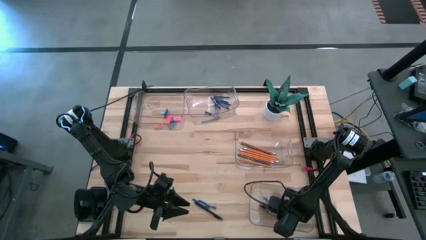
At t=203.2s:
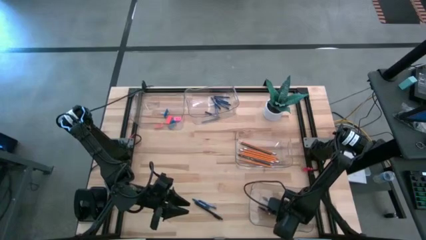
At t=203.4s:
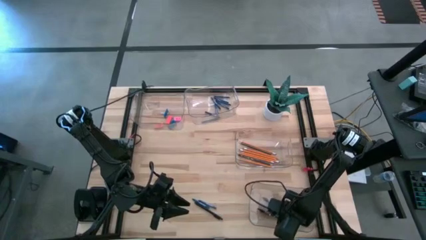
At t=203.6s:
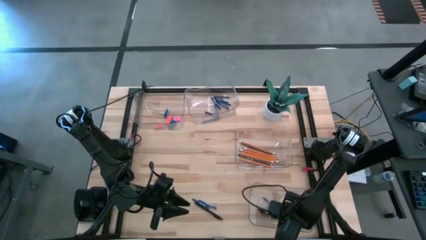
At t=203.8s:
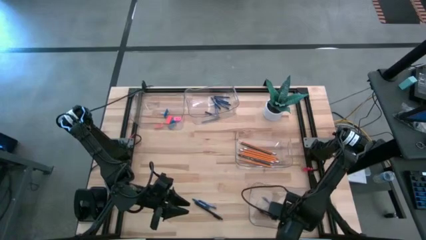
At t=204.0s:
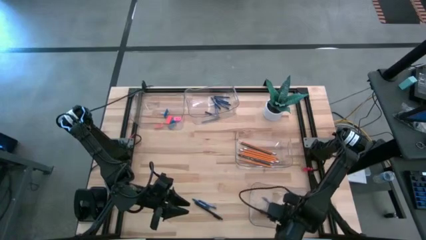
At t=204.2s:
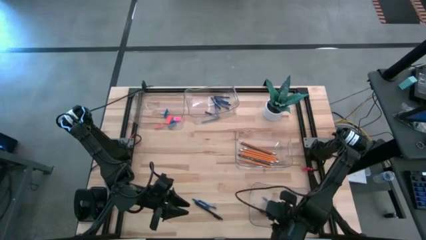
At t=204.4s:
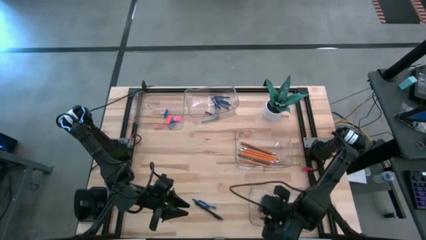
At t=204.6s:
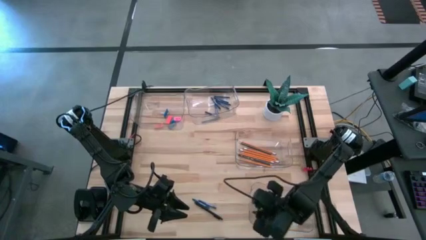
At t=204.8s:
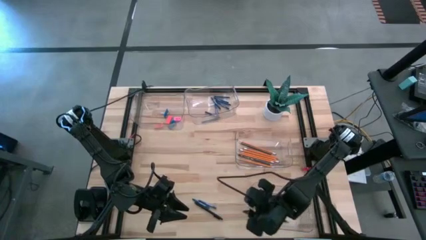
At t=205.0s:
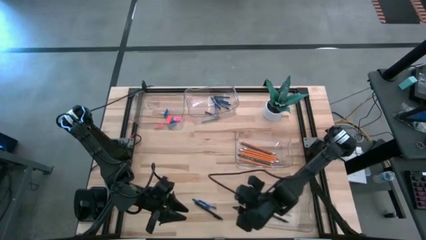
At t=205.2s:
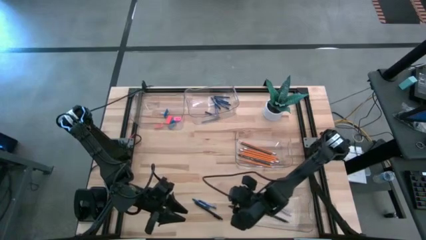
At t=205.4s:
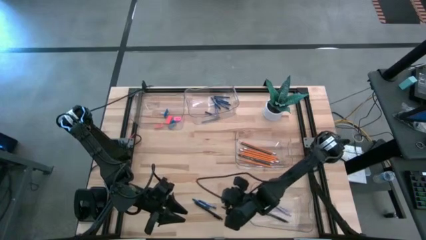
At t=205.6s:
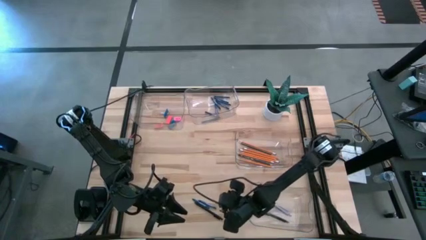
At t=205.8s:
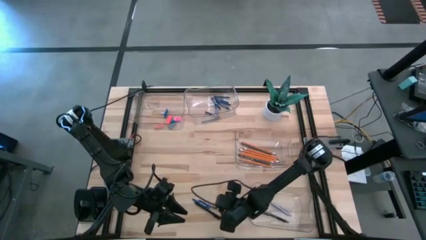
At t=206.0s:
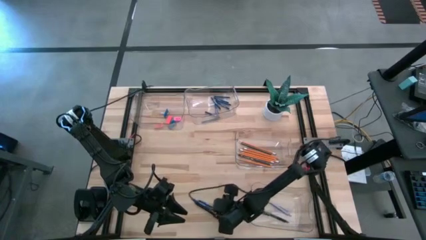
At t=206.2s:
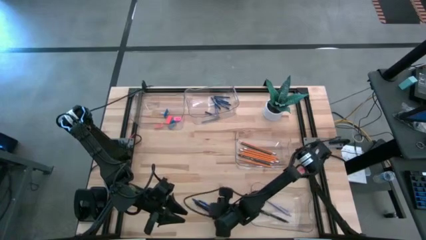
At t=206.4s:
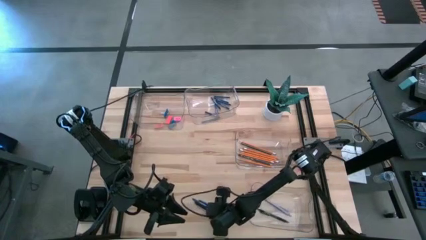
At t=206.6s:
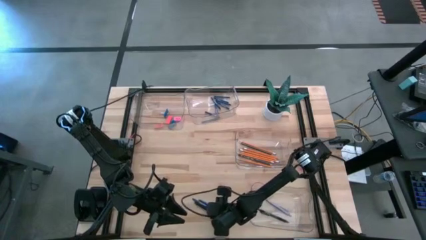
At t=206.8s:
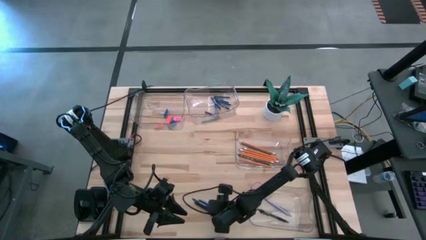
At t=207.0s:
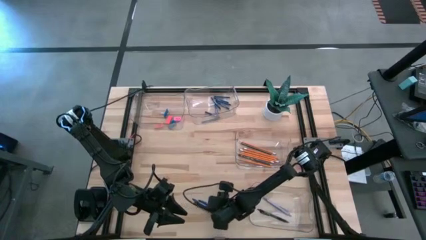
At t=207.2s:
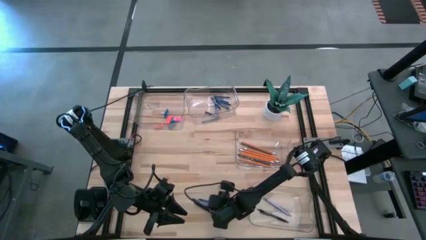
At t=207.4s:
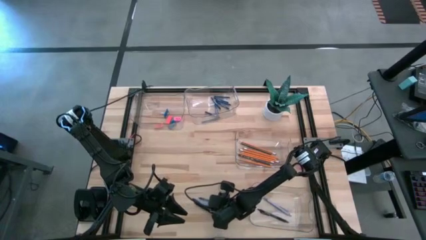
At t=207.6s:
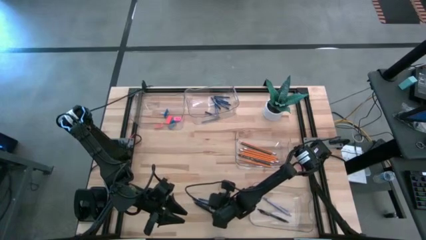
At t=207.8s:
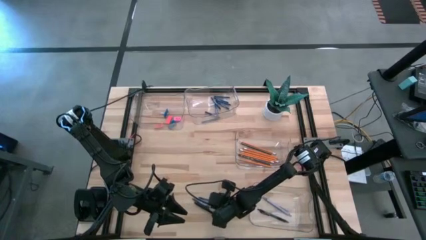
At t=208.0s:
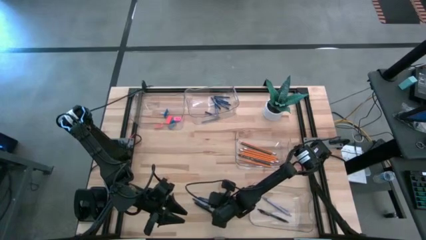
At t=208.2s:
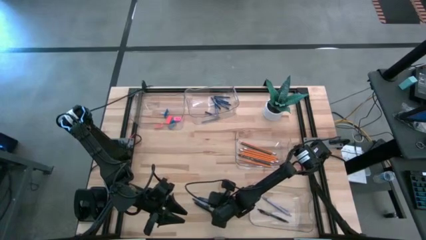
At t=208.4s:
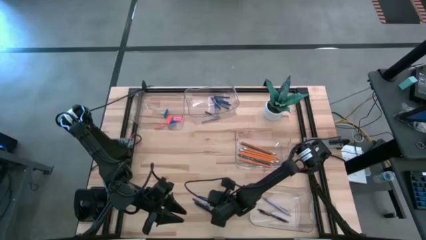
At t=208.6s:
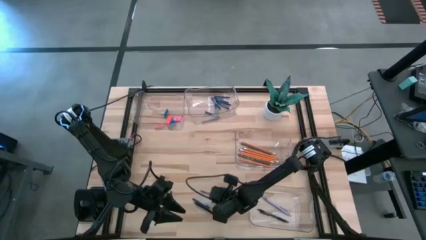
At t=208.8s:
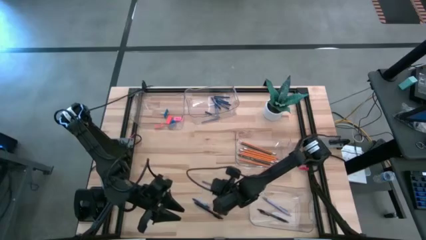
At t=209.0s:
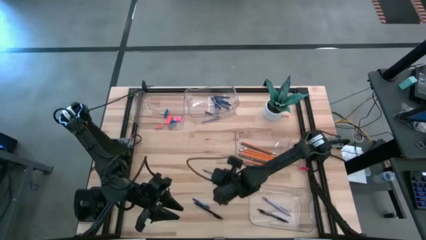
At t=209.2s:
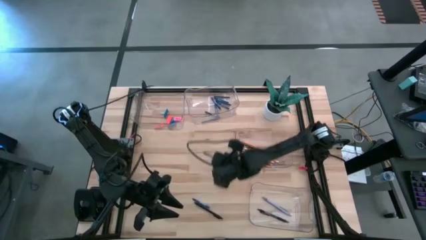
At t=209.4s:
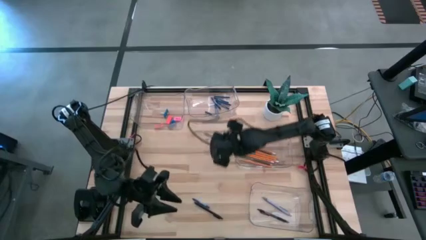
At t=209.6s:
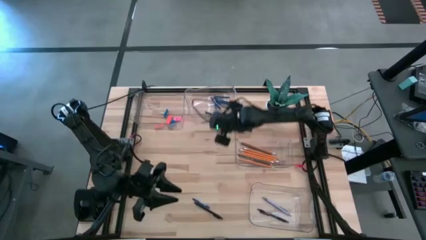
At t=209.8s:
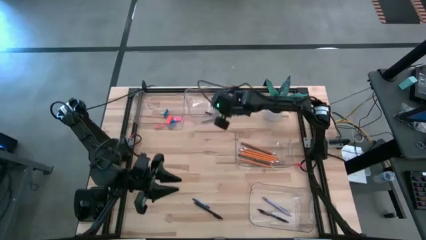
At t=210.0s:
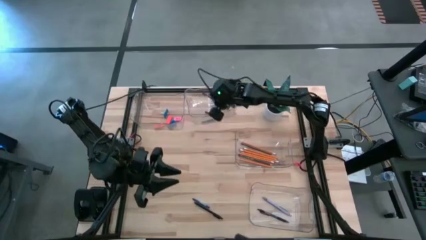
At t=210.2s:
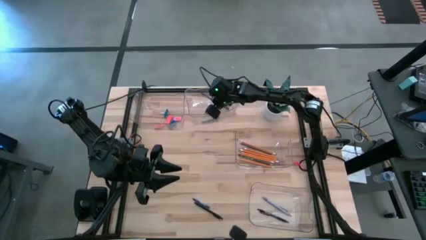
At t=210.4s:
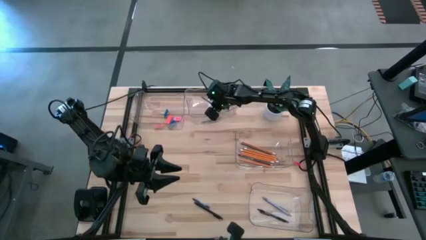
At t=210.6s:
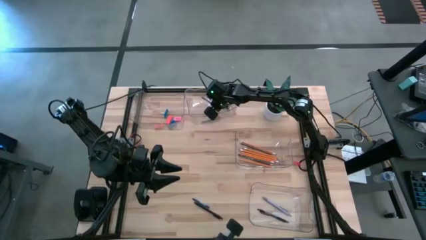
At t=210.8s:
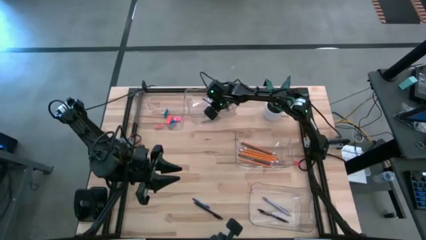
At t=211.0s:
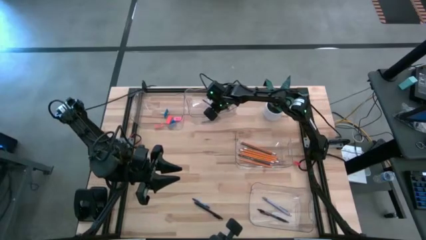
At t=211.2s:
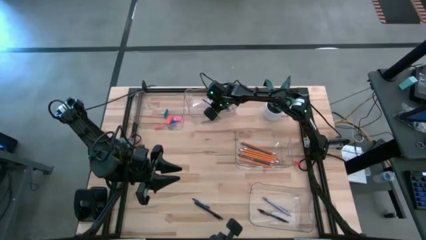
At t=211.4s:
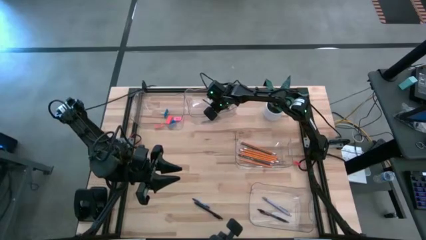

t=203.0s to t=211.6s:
Task: Sort crayons/erasers/pens/pencils in bins
Put the blue crayon into the top right transparent bin

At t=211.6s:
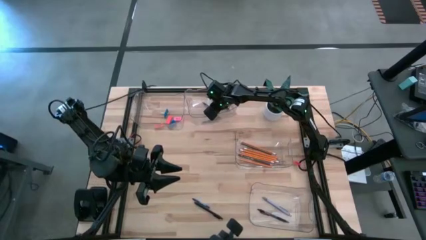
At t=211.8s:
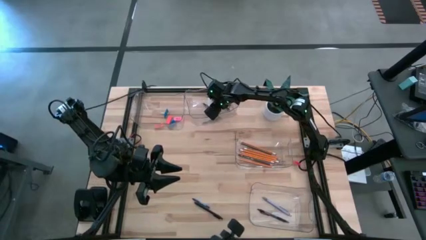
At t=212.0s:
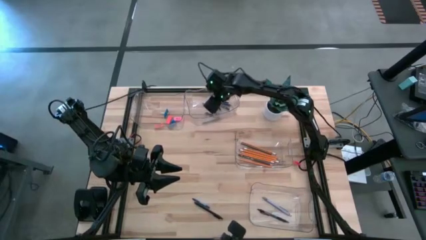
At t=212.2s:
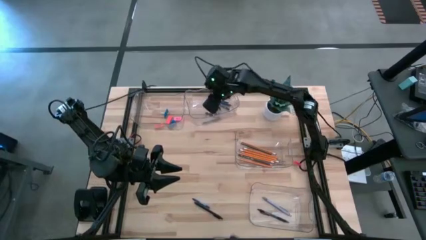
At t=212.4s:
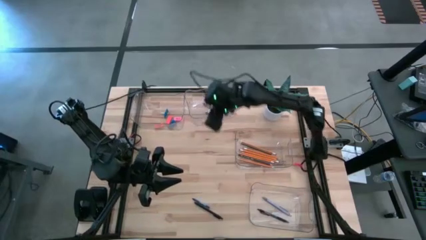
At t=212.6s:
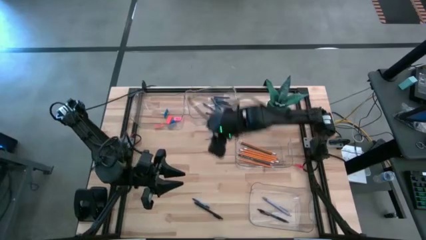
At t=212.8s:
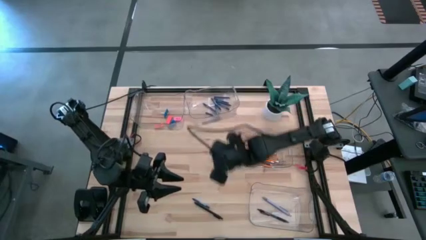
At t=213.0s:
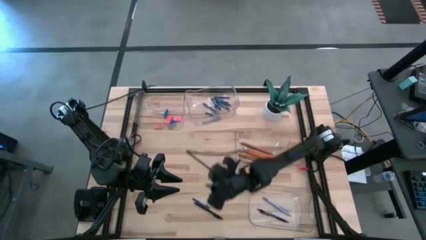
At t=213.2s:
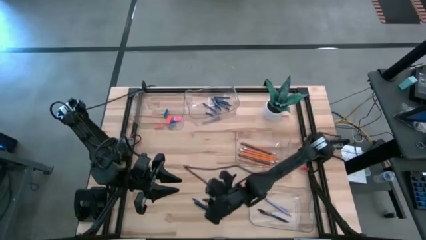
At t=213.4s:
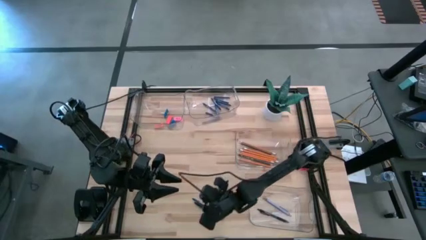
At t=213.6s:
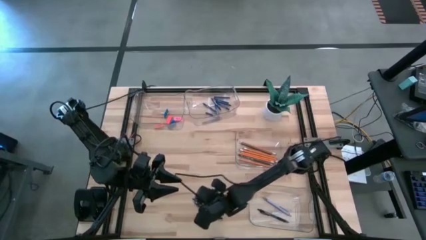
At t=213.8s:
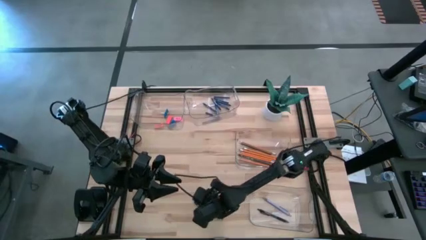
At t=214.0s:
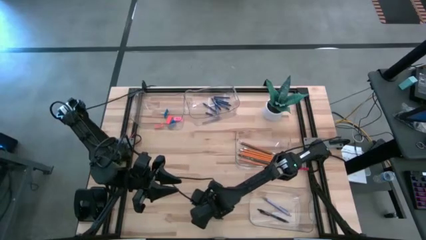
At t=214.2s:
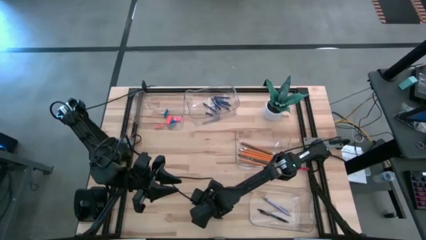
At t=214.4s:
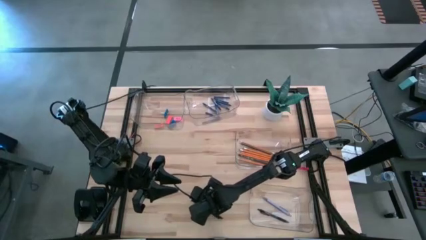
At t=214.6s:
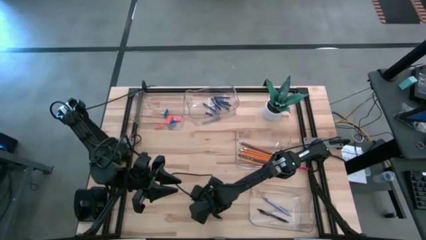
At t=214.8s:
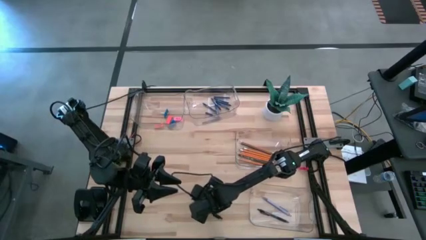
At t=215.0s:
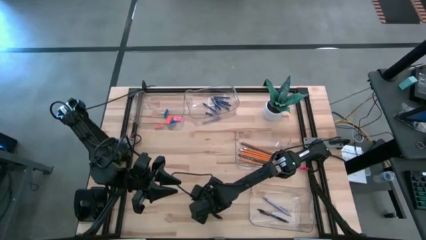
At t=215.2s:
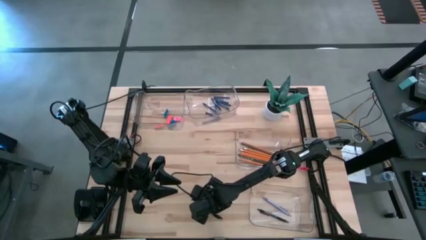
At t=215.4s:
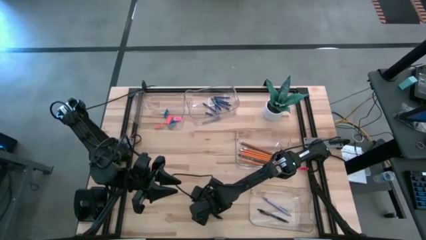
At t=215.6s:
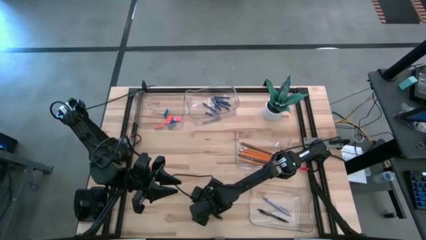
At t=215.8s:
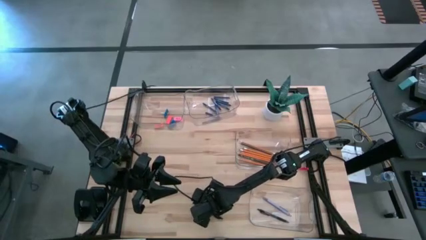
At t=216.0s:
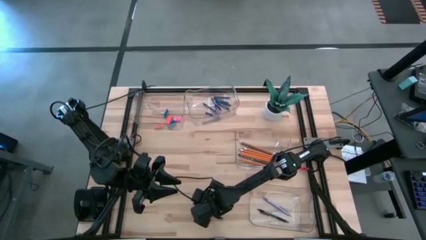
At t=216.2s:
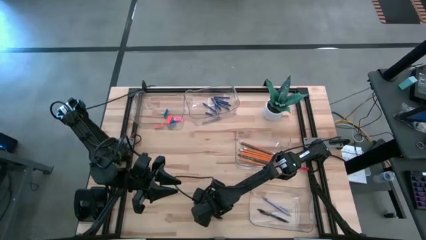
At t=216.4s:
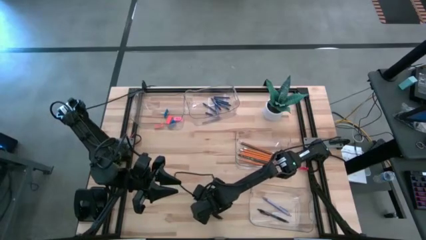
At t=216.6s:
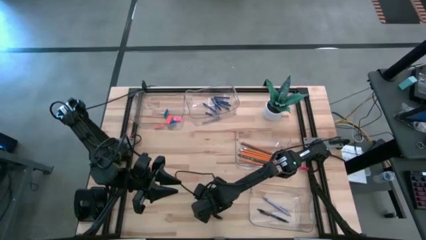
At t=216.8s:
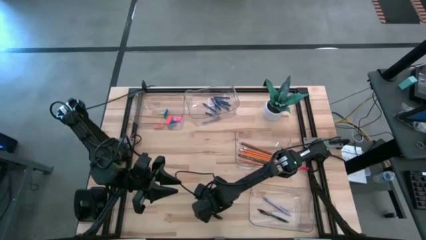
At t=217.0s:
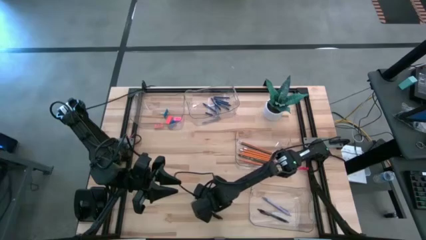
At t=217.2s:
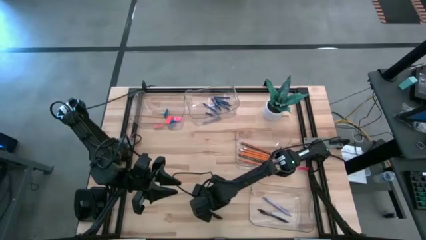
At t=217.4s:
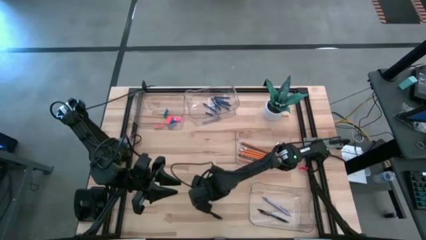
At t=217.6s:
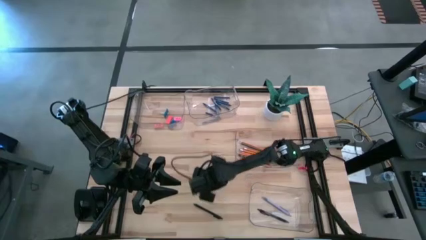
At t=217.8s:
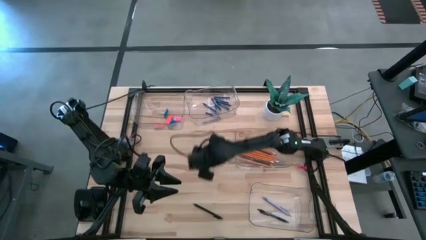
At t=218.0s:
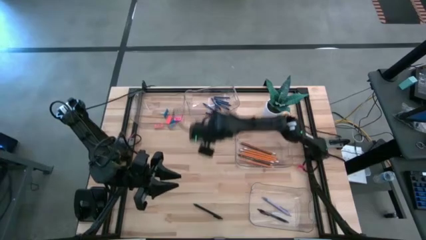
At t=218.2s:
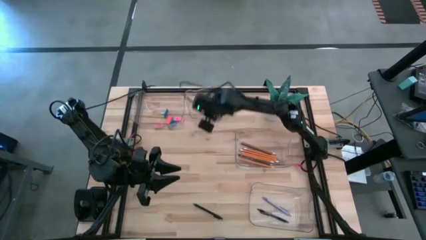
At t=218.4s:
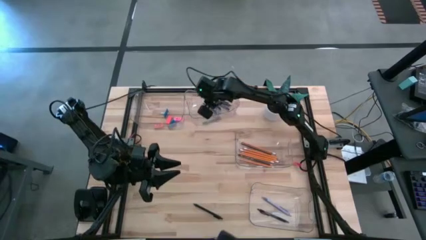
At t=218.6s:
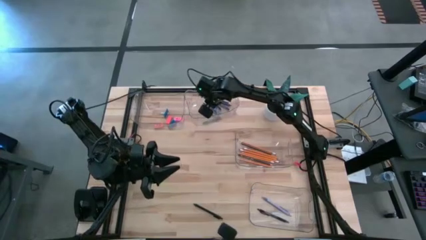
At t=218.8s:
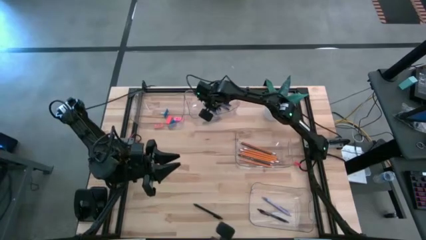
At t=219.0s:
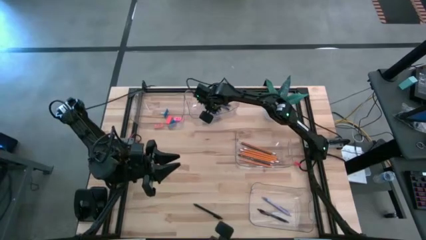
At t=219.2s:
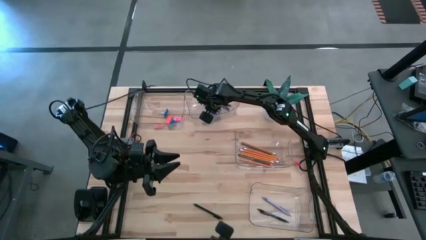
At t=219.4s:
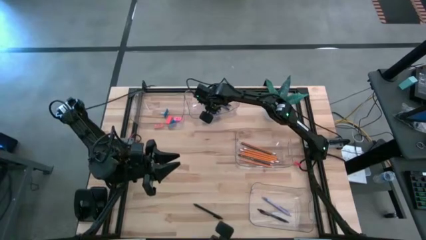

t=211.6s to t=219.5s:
Put the blue crayon into the top right transparent bin
